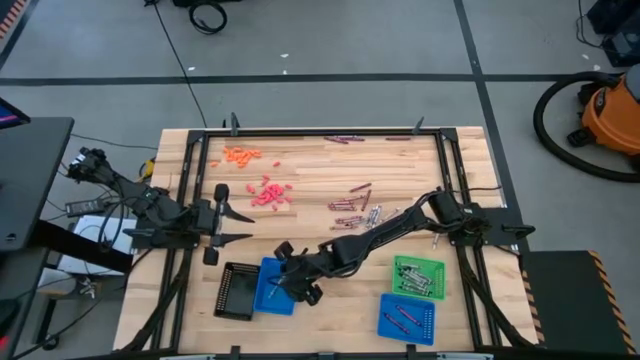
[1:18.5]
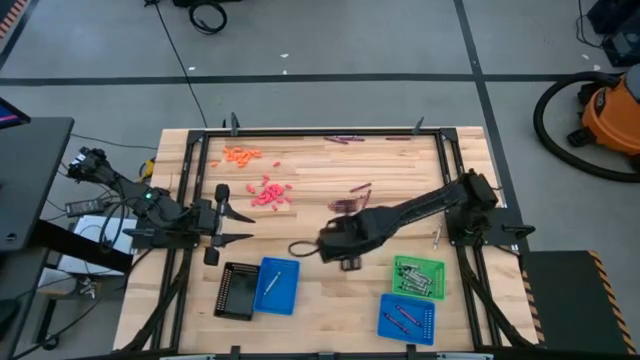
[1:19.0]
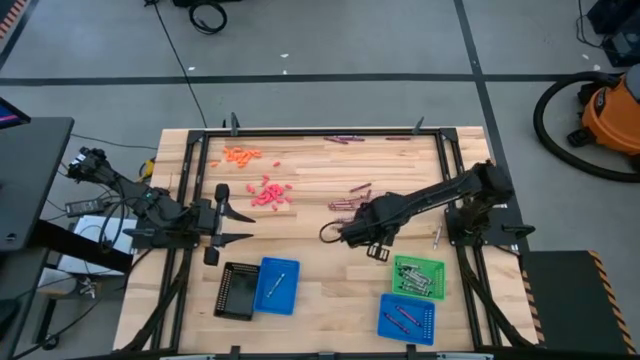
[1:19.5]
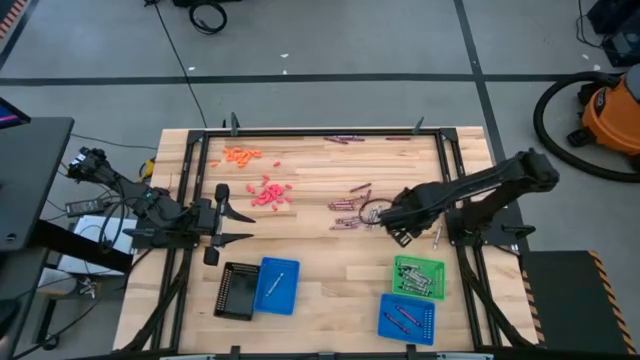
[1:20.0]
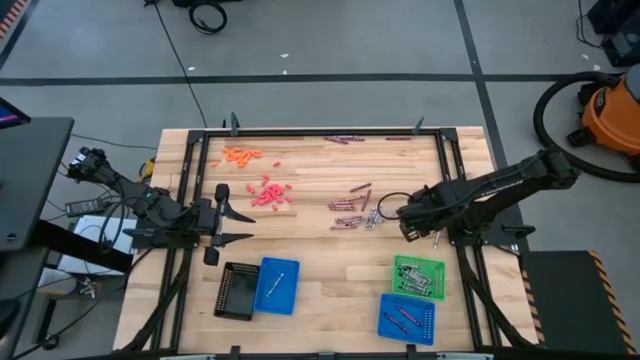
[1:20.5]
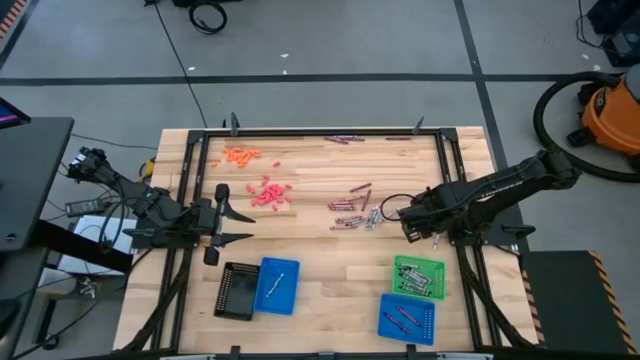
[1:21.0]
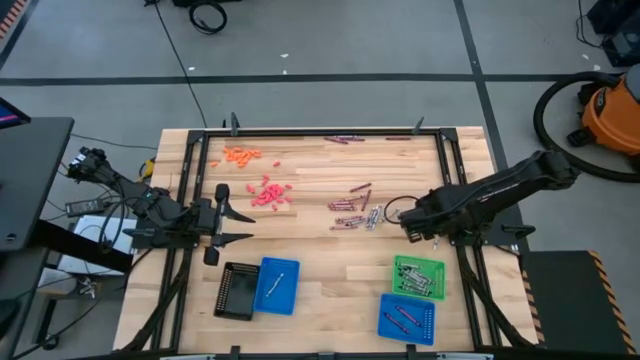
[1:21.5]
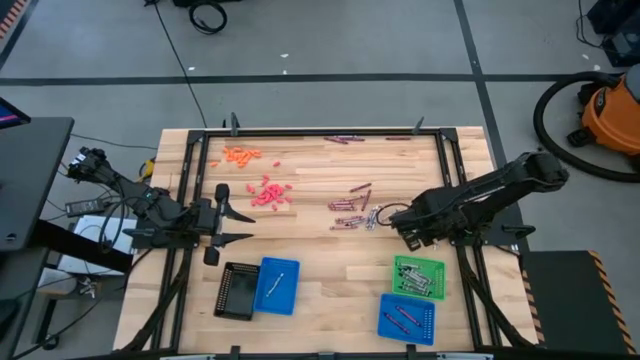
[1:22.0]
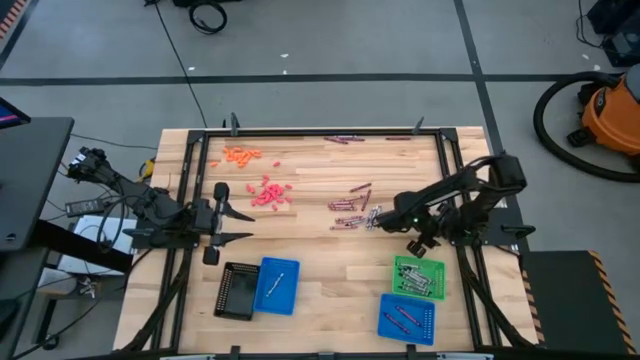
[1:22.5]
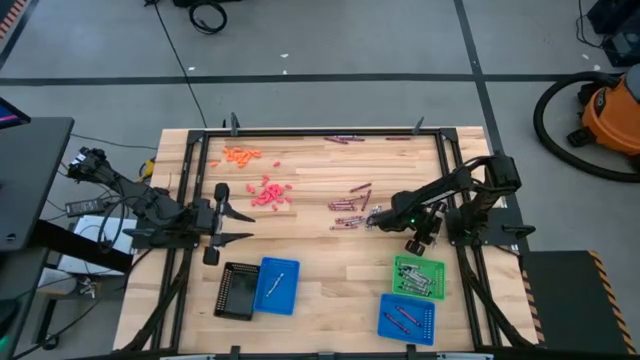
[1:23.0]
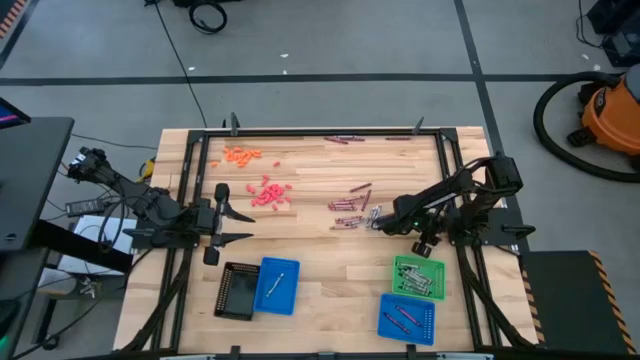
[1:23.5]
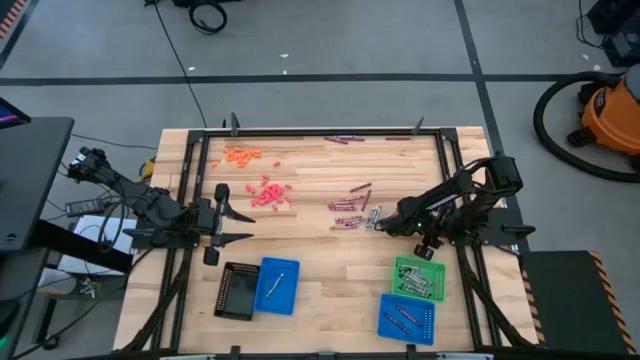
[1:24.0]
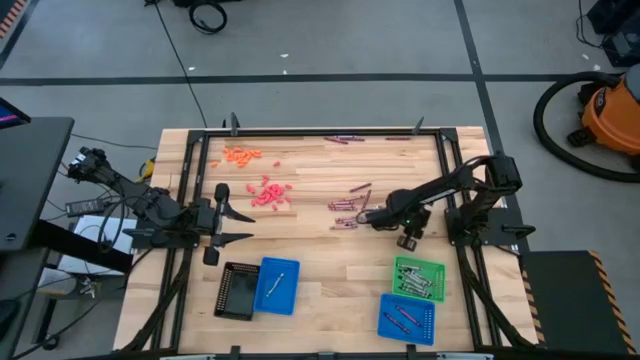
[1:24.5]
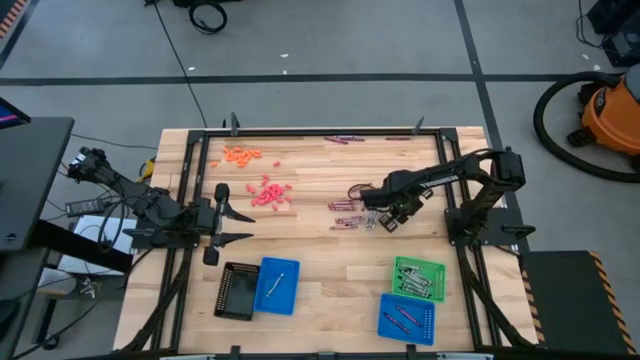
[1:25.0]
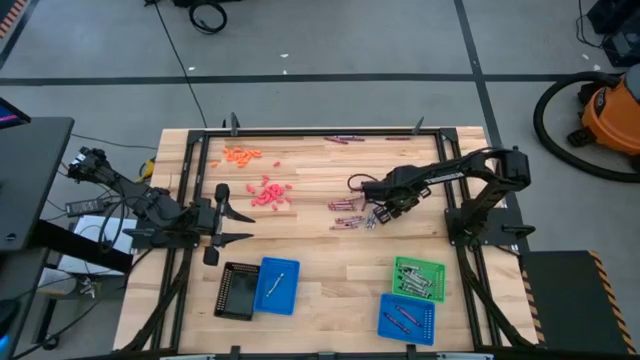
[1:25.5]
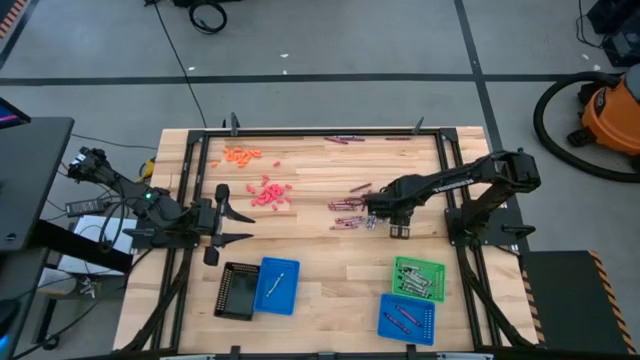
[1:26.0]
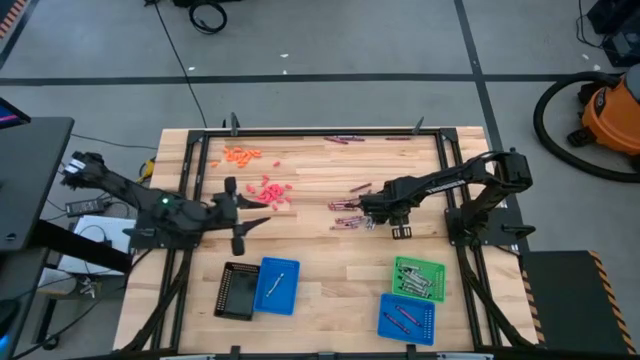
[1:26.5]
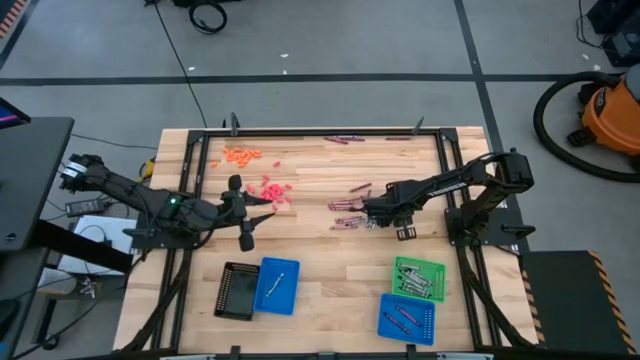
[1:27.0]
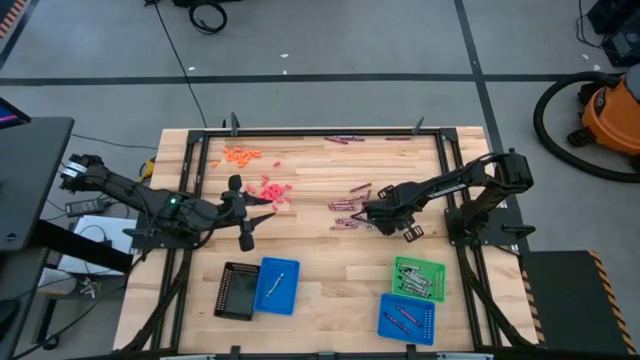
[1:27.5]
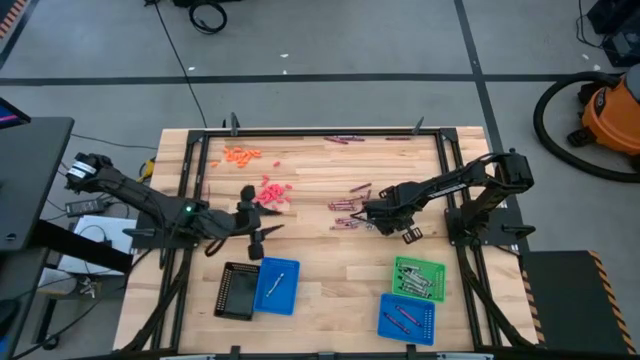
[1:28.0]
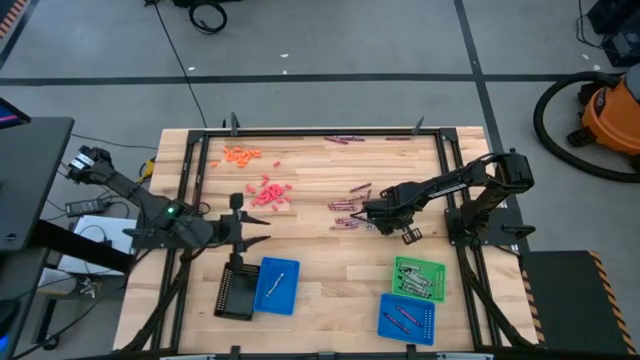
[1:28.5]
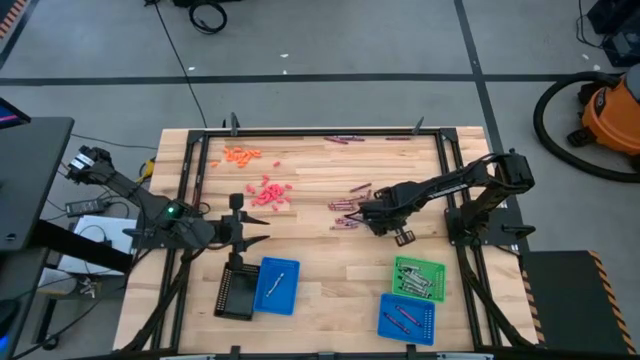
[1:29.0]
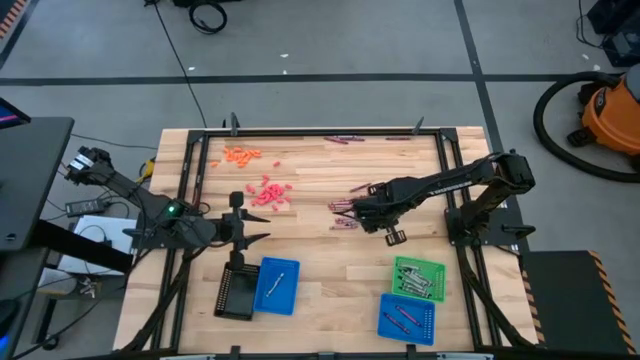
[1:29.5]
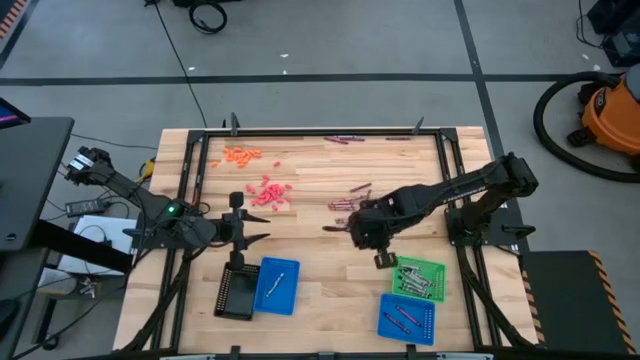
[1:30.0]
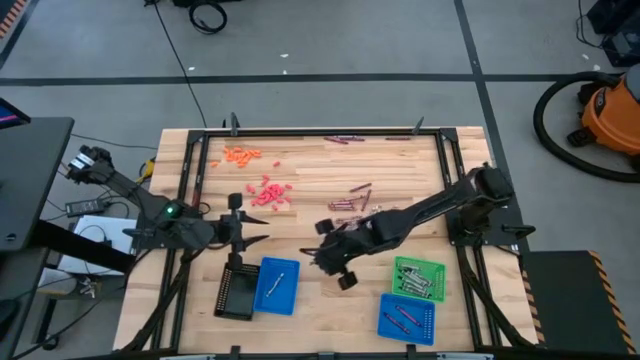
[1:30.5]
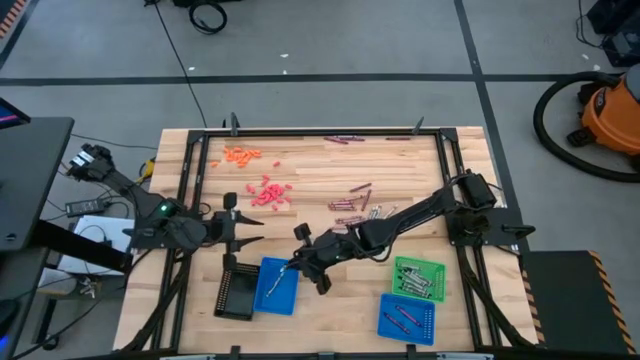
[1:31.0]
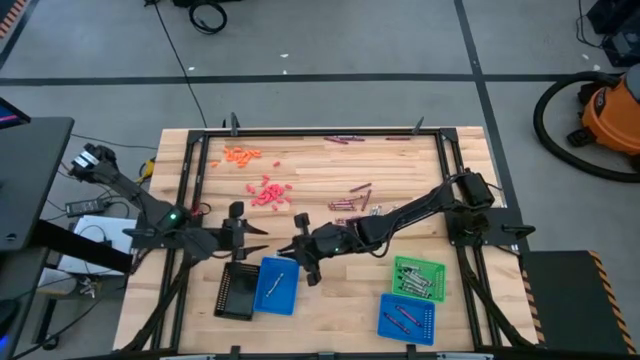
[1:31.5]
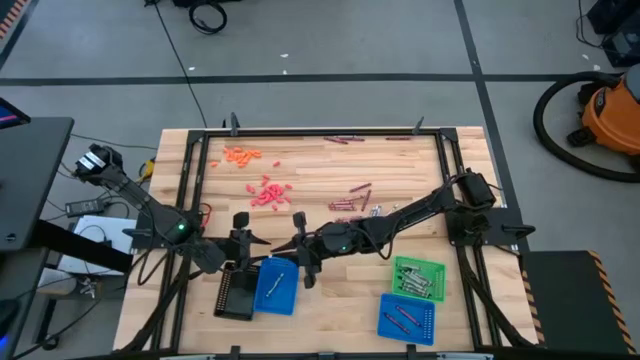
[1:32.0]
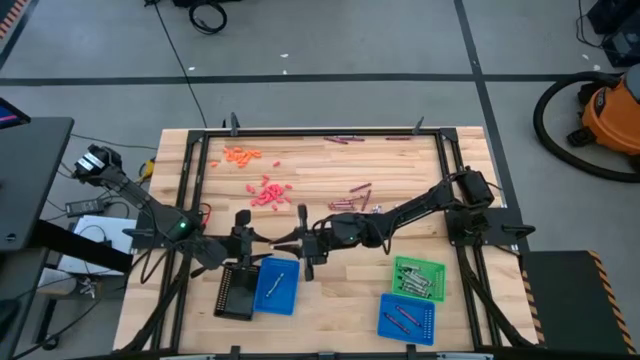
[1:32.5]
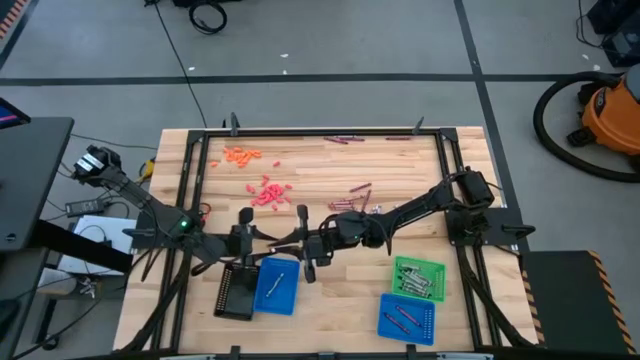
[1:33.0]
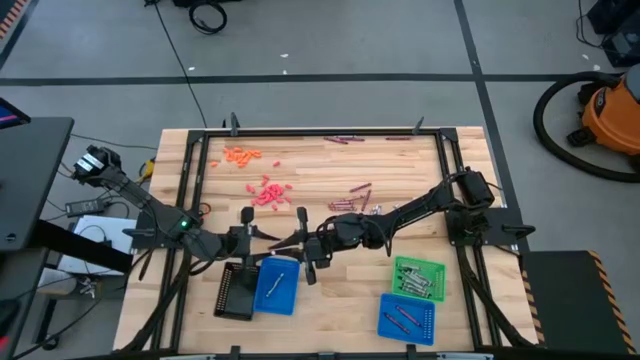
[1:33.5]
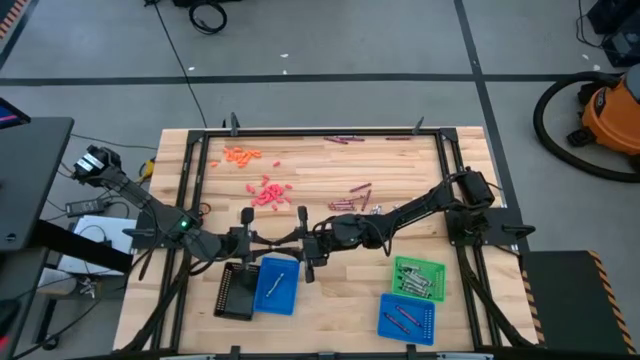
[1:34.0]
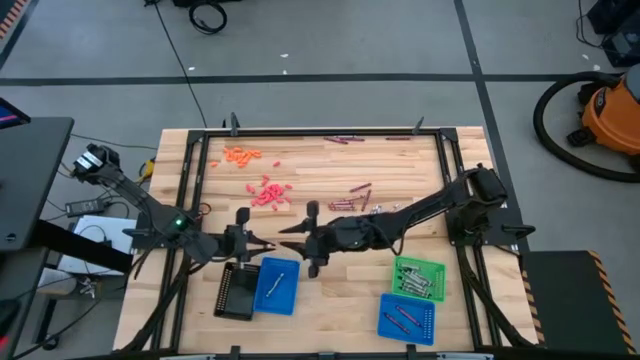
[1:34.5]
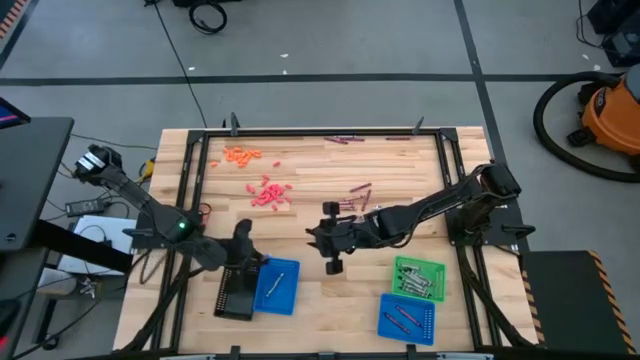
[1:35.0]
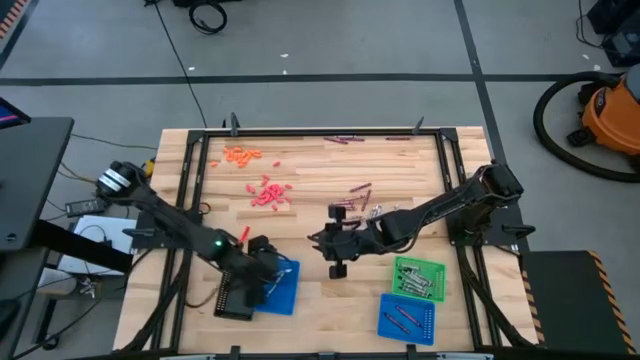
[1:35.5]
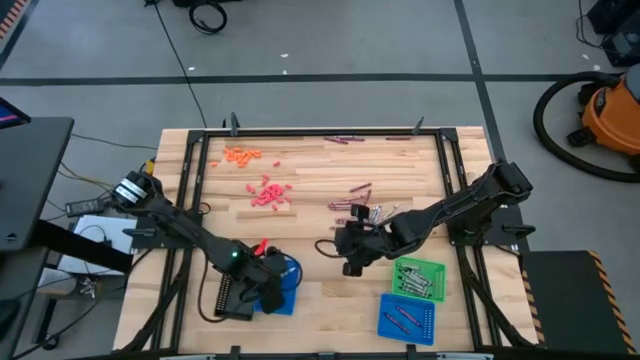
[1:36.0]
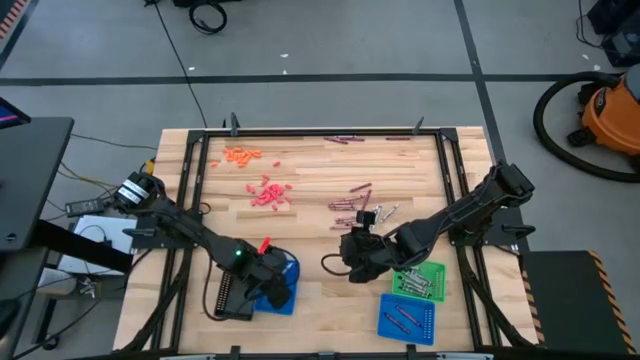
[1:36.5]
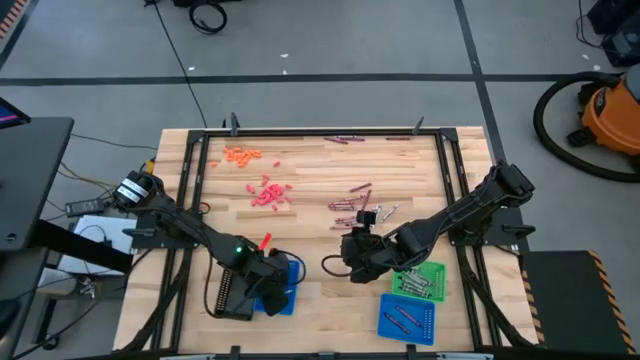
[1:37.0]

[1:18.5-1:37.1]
Task: Sort crayons
Put the white crayon into the left blue bin

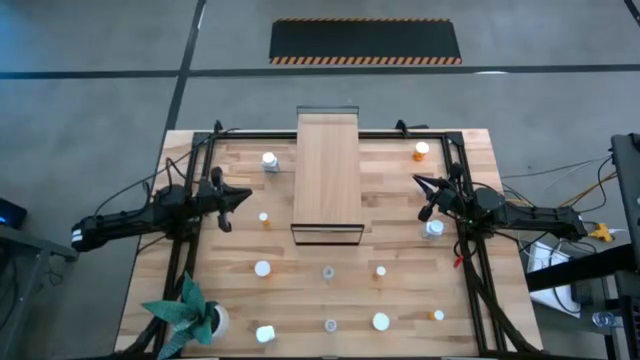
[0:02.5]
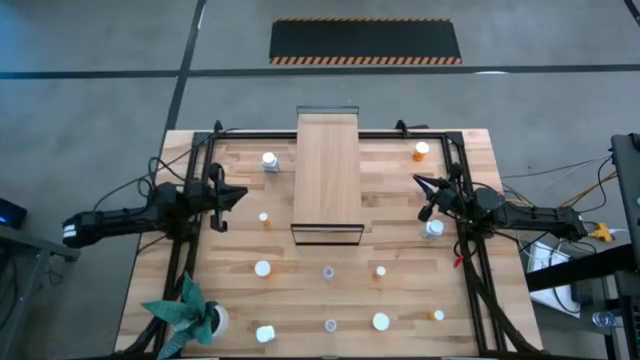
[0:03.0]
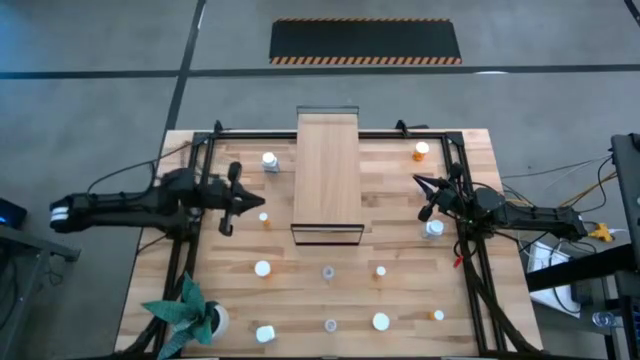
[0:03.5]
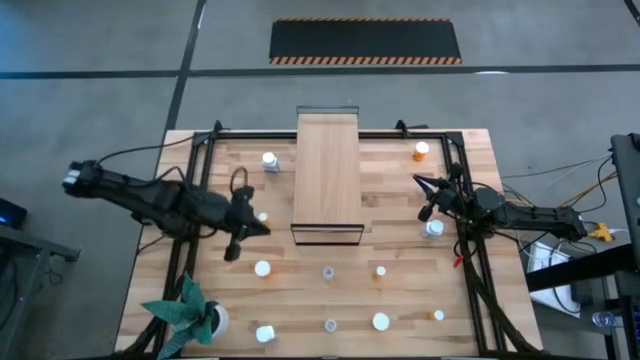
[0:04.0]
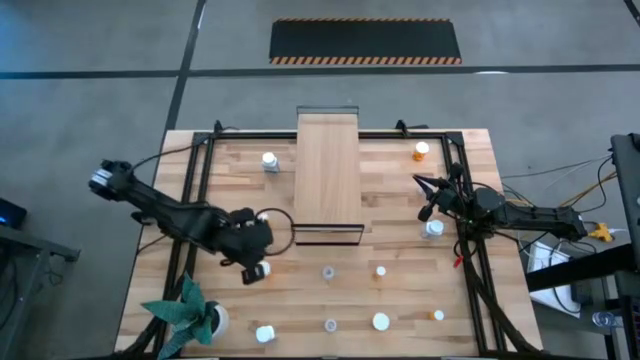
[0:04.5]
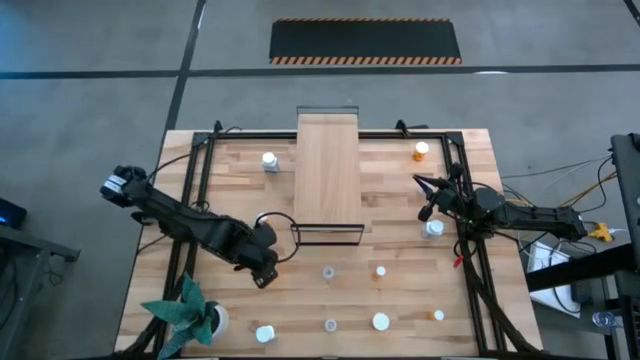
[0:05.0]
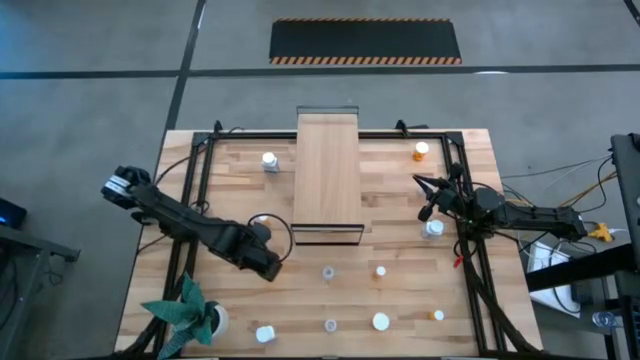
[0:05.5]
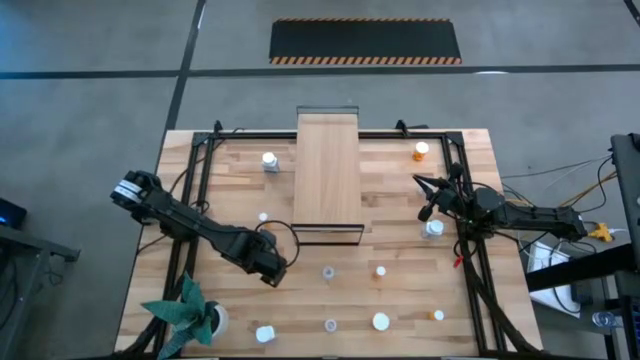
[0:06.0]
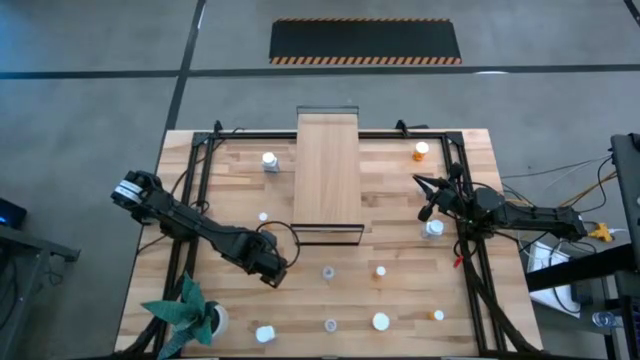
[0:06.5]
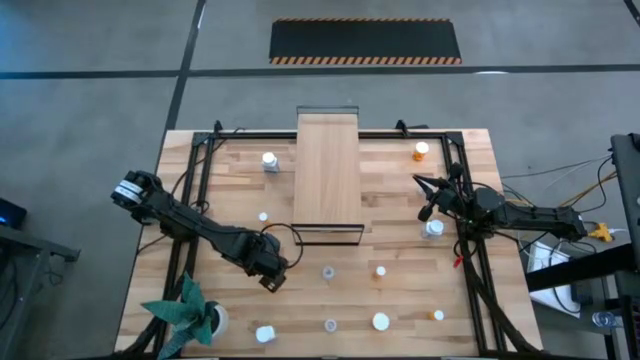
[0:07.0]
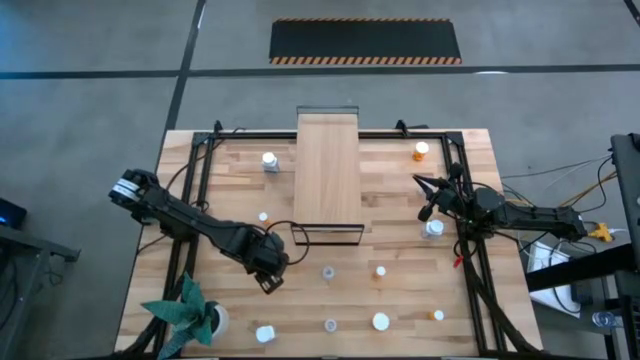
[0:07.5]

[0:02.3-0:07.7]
Task: Pick and place medicine bottles onto shelf by color
Put the middle left big orange pill bottle on the shelf
